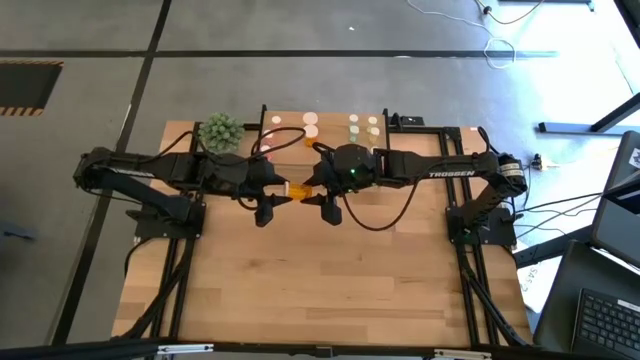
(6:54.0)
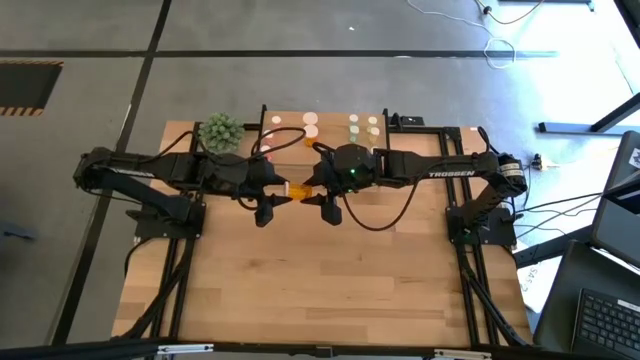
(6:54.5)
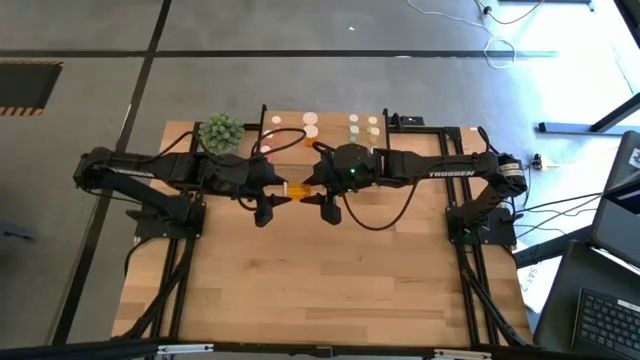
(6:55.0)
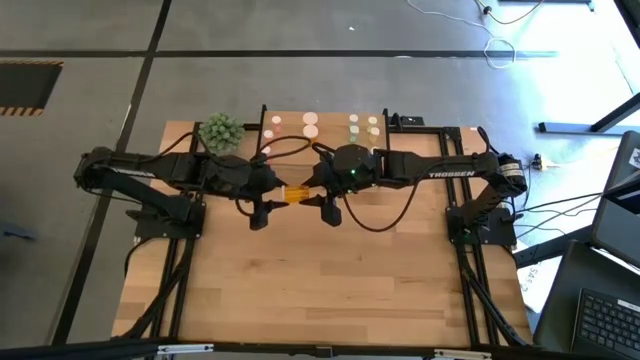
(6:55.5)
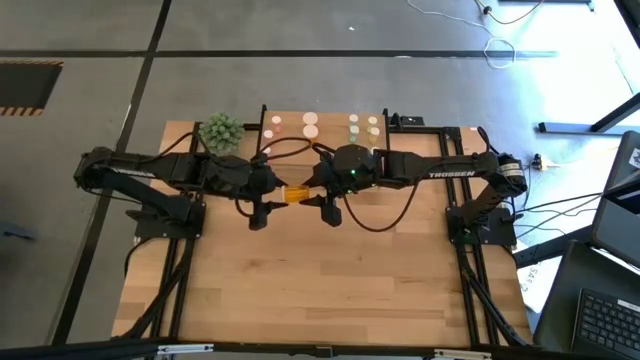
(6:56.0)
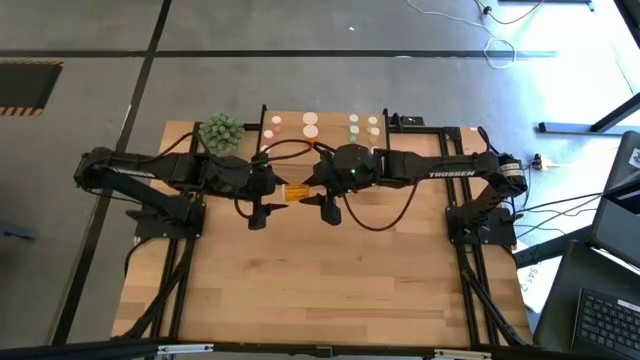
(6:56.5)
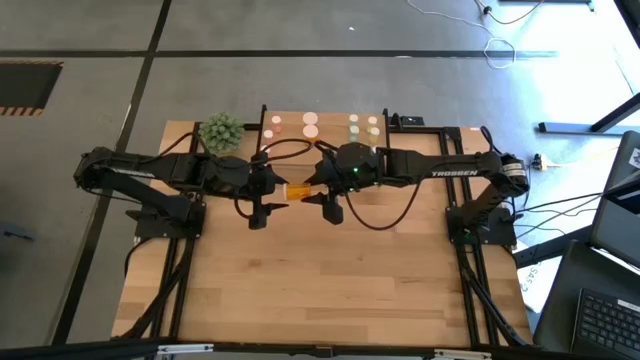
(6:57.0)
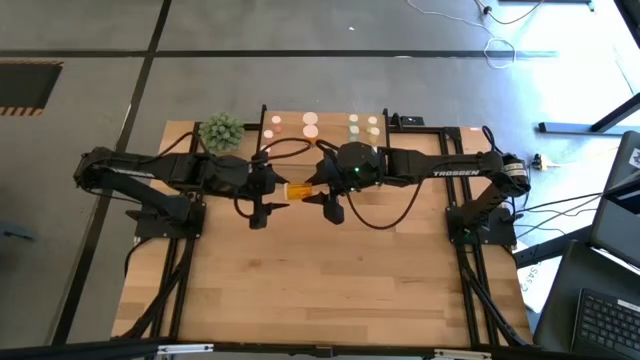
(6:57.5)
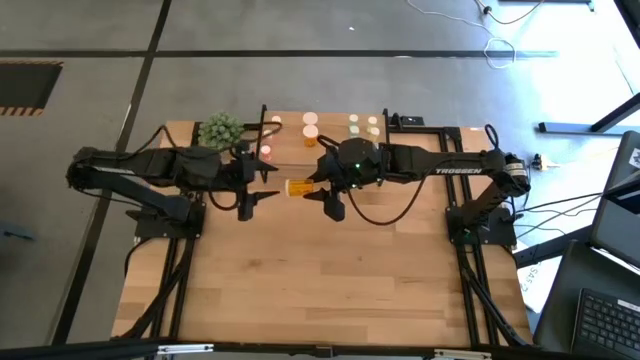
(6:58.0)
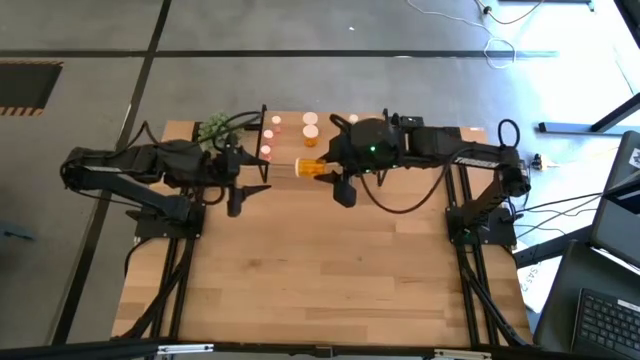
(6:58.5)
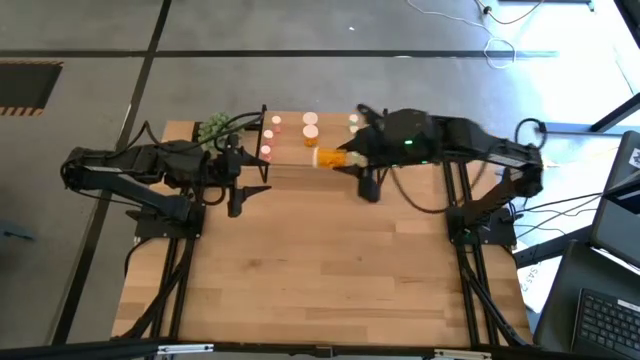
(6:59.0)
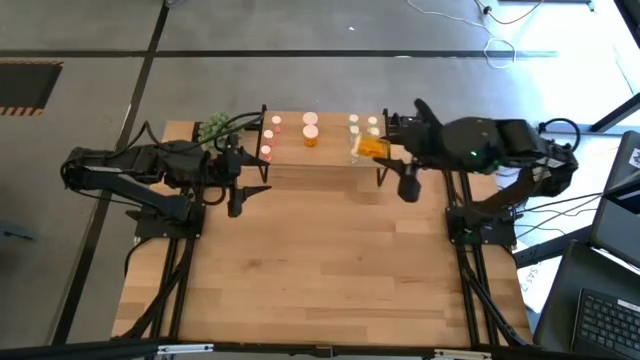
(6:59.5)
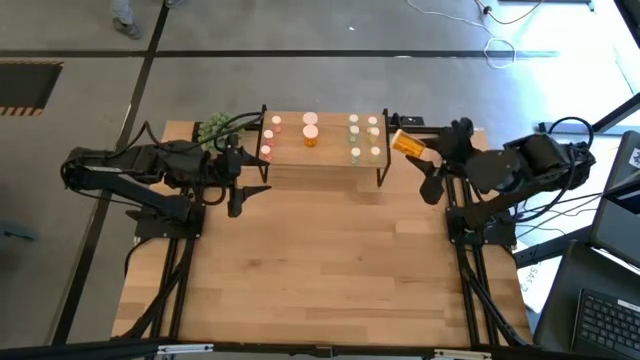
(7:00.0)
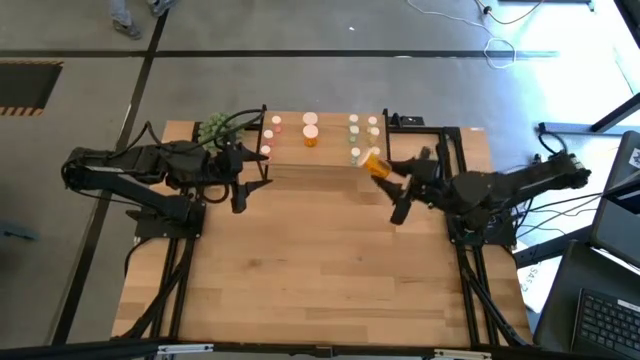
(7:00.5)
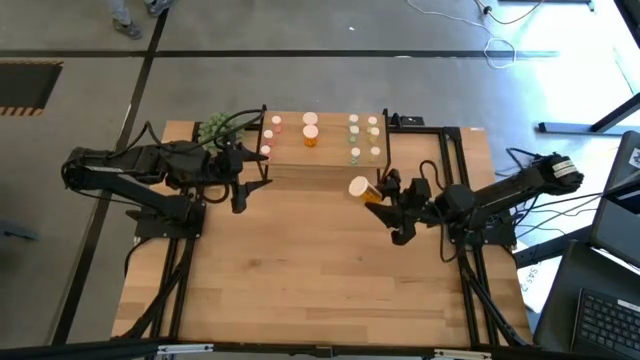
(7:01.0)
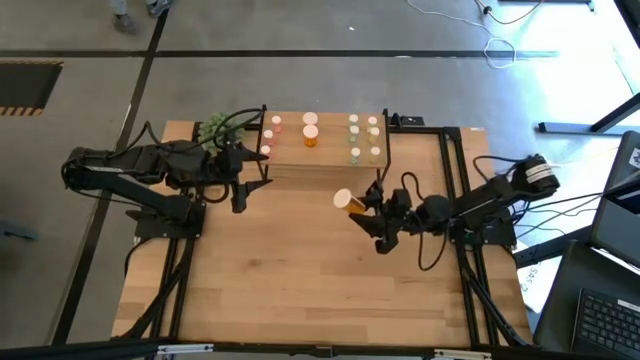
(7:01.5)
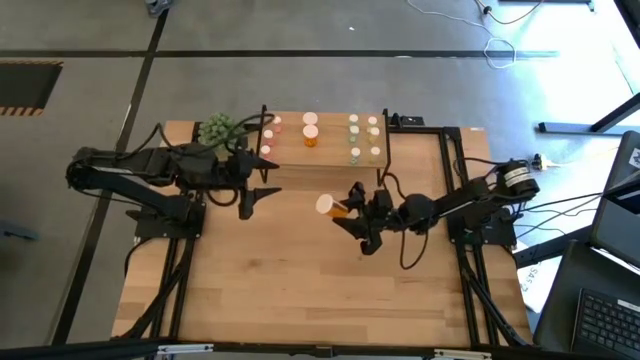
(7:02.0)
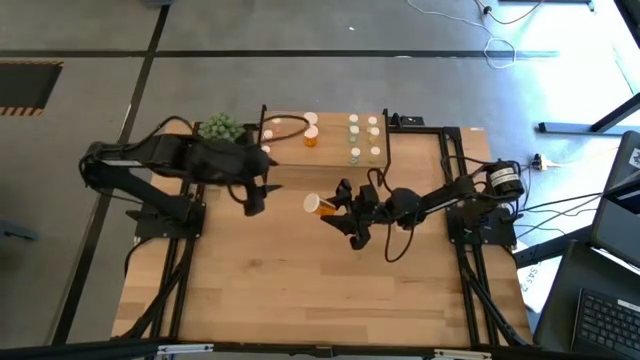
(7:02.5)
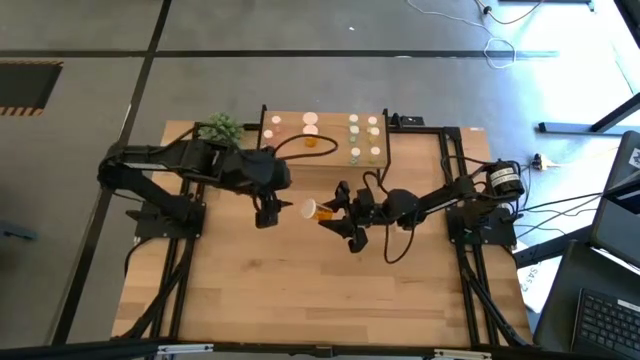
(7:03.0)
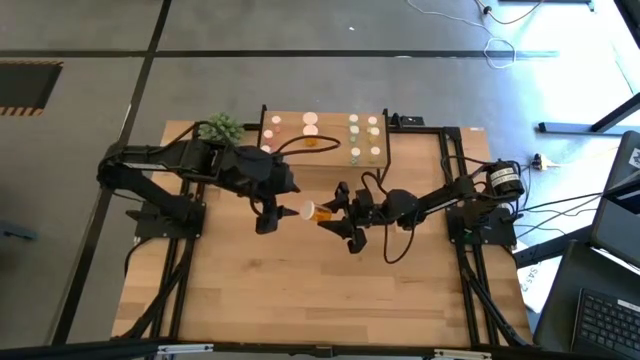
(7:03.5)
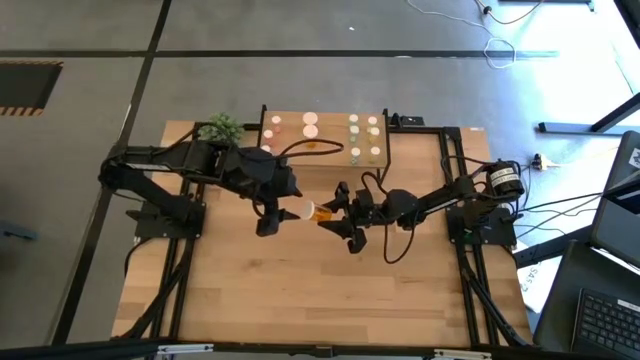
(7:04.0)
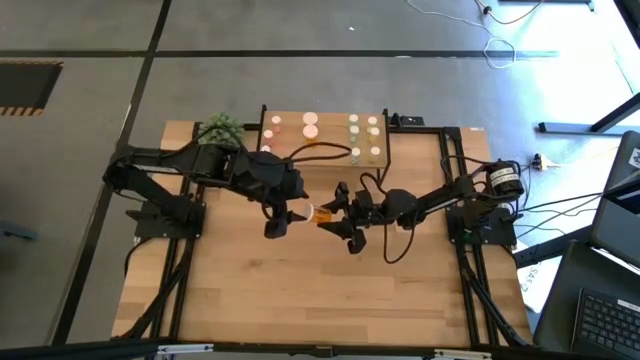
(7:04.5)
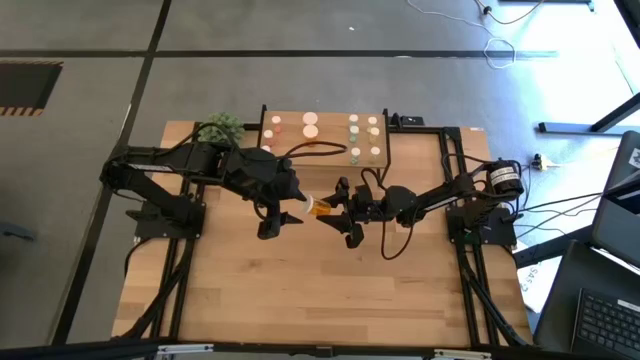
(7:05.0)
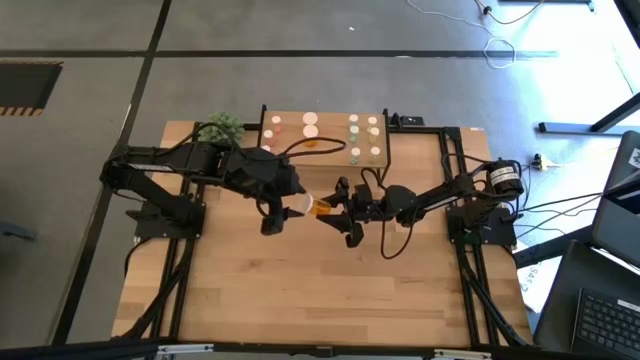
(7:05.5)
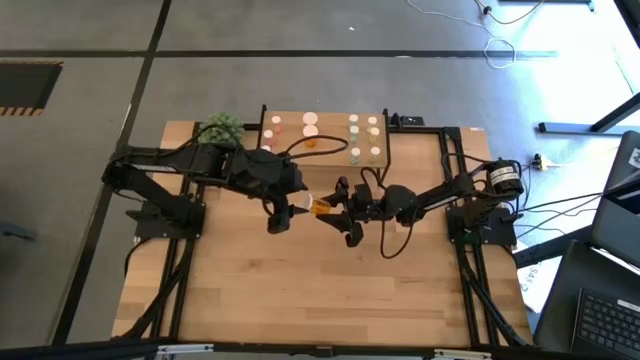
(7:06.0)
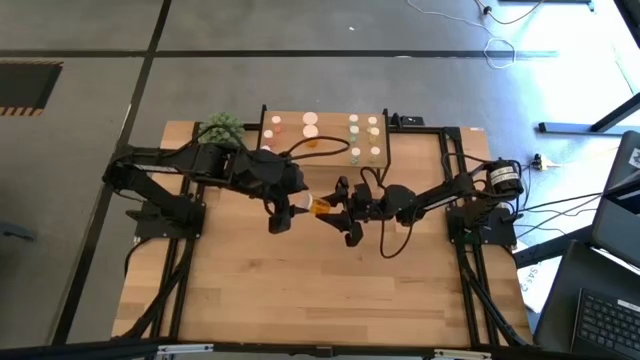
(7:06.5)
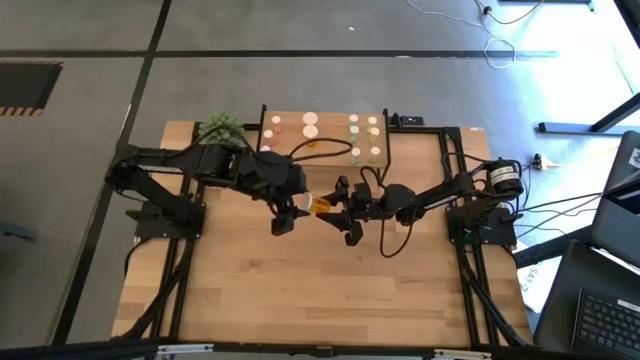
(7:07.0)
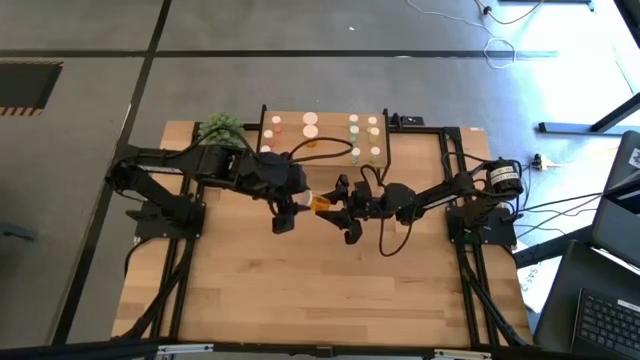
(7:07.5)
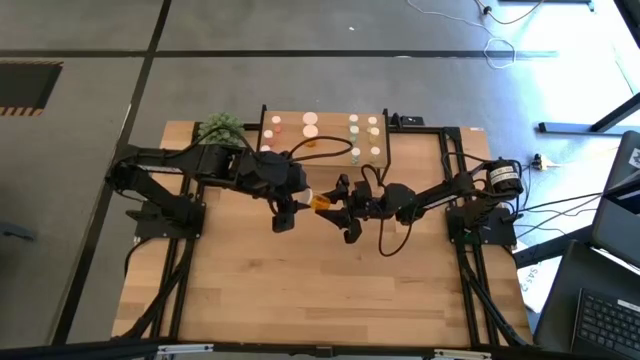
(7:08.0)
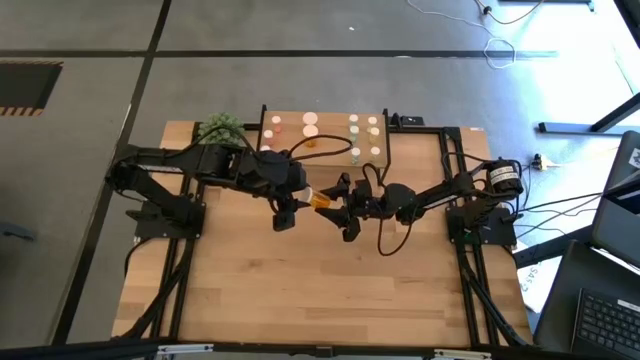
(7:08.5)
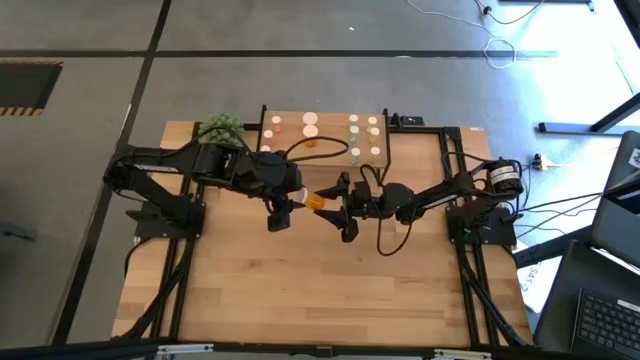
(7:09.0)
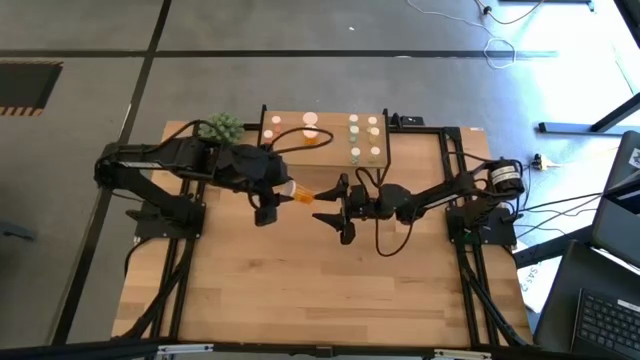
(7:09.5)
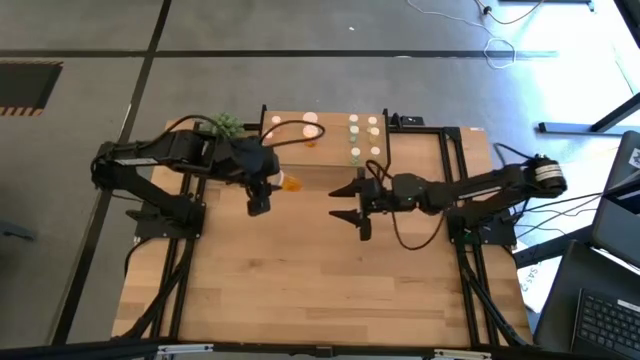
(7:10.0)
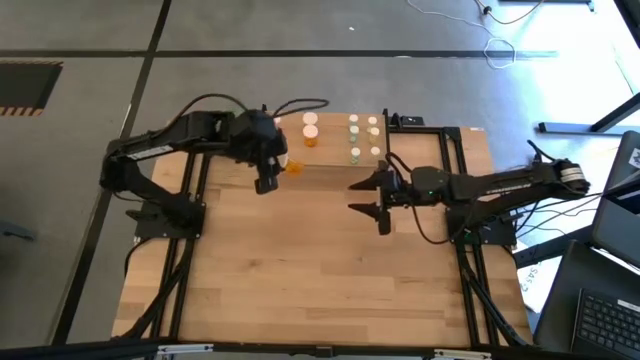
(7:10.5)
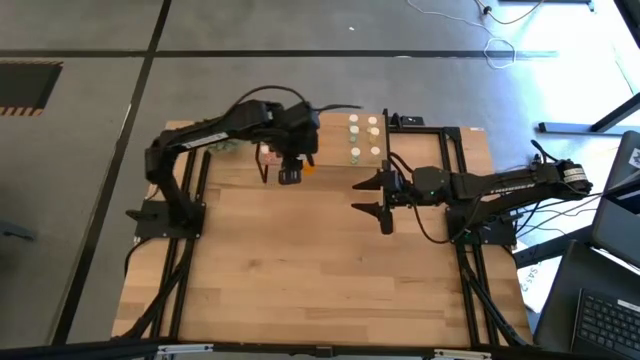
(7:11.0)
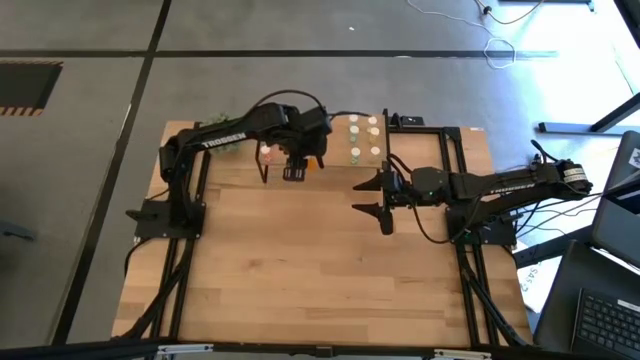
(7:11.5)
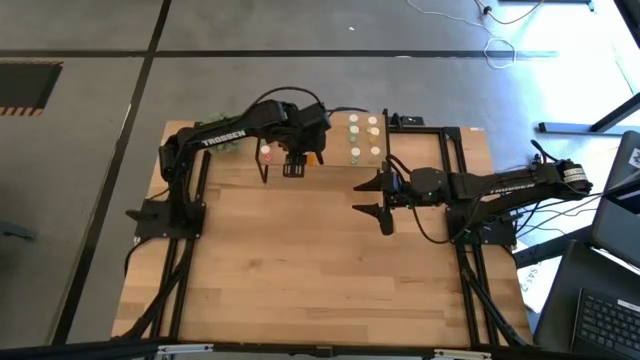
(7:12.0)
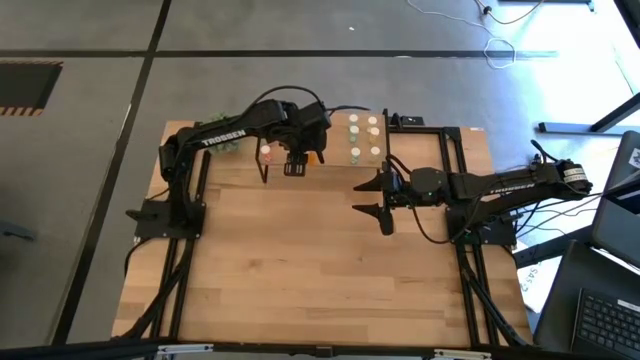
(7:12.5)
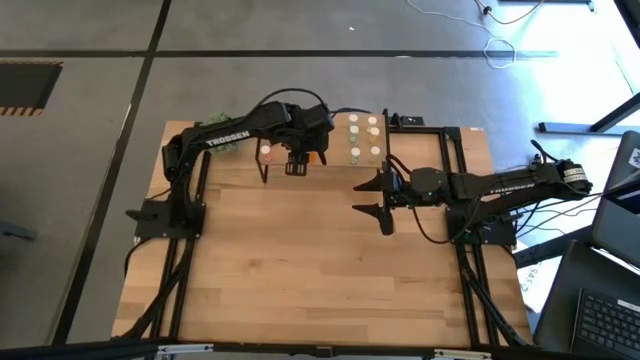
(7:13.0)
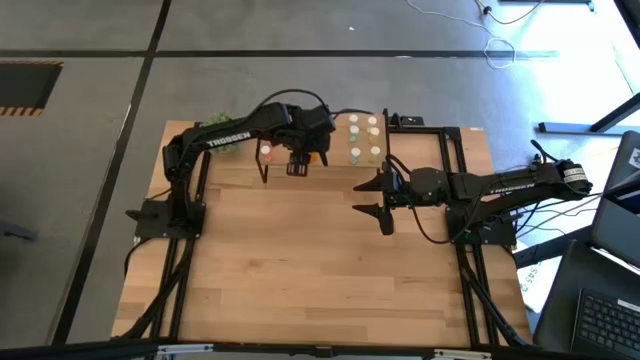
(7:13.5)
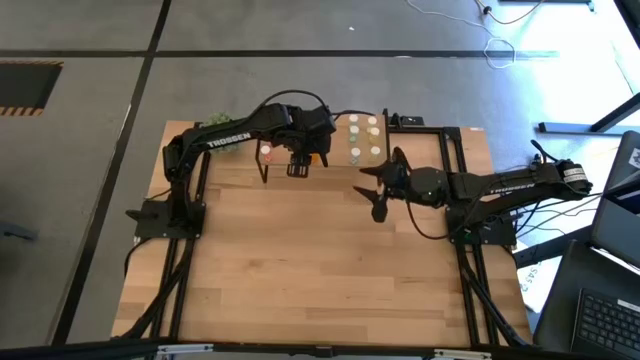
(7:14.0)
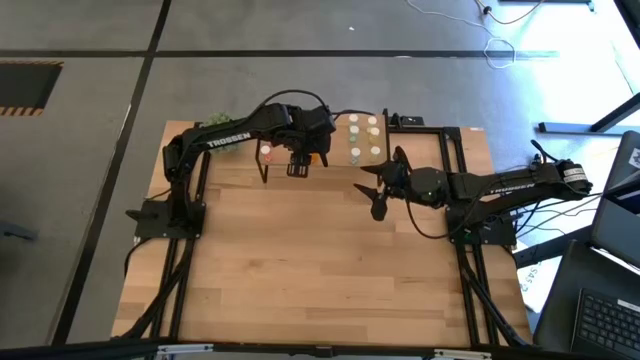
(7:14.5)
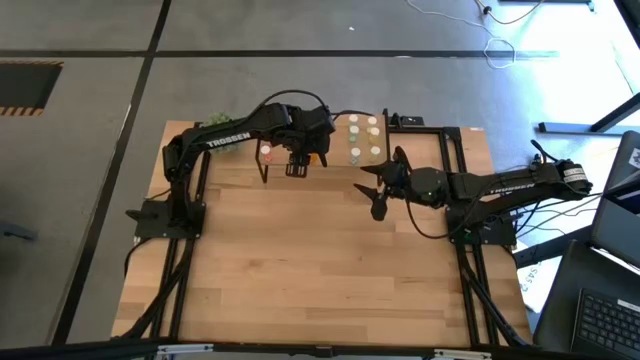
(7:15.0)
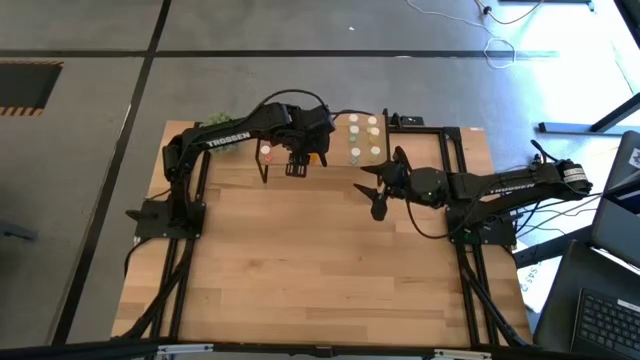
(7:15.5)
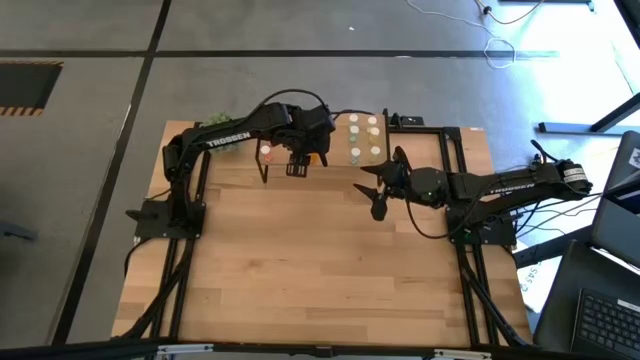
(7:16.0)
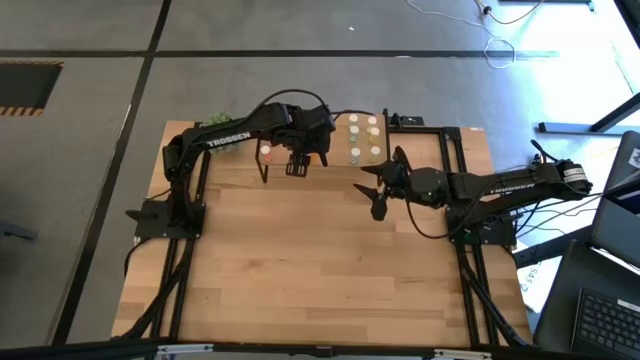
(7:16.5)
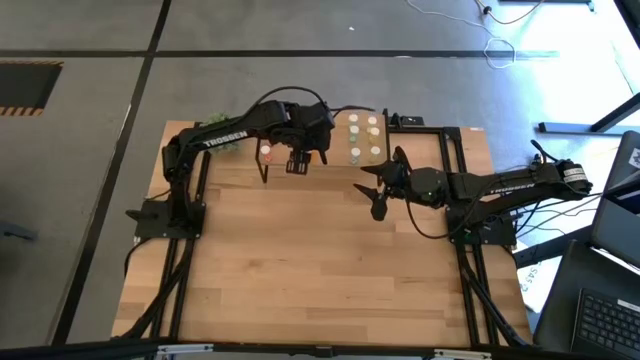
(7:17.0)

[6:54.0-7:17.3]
Task: Pick and place medicine bottles onto shelf by color
Put the orange medicine bottle on the shelf, aligned with the other orange medicine bottle
